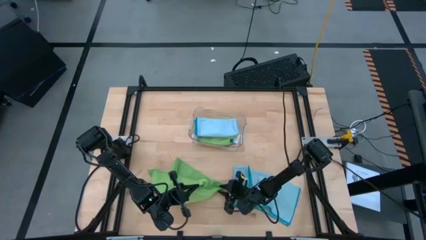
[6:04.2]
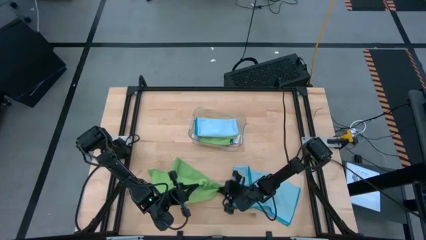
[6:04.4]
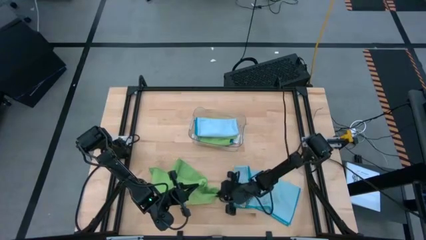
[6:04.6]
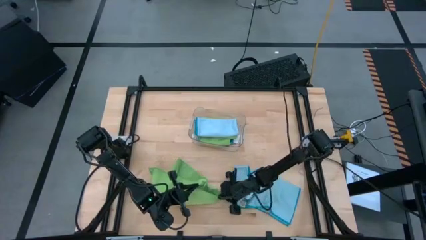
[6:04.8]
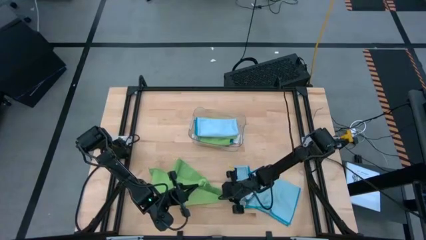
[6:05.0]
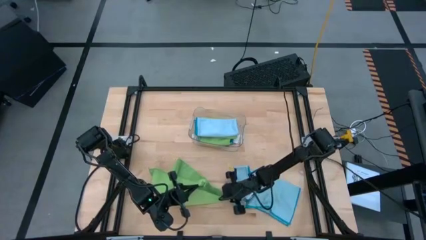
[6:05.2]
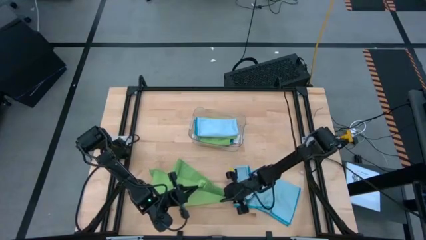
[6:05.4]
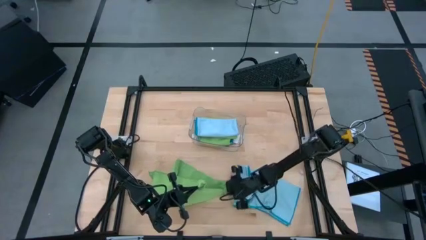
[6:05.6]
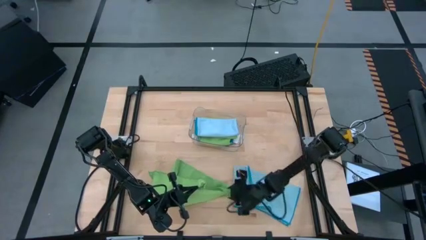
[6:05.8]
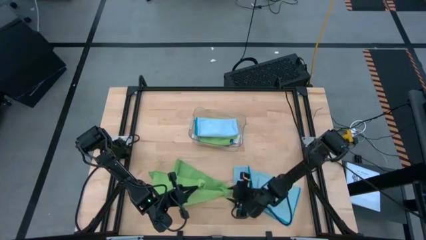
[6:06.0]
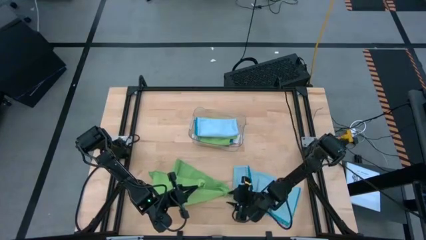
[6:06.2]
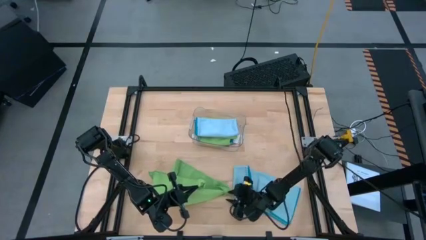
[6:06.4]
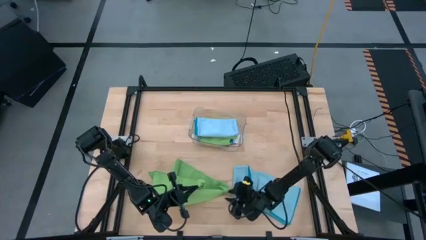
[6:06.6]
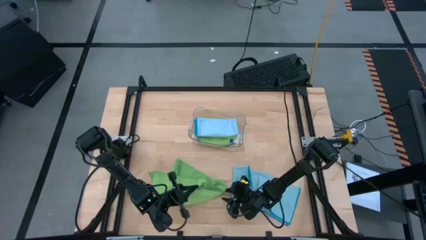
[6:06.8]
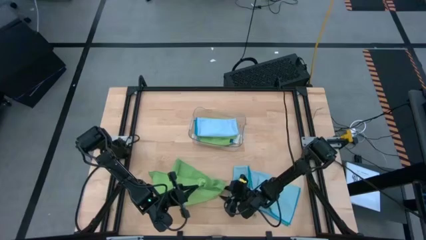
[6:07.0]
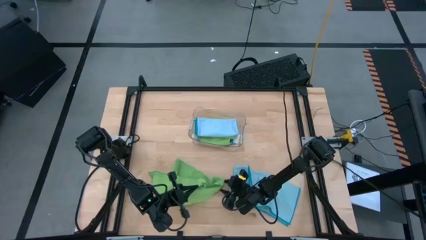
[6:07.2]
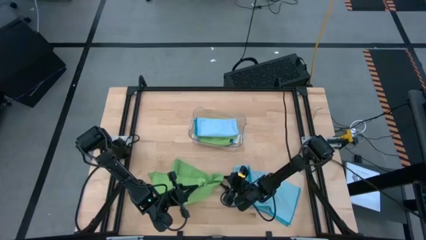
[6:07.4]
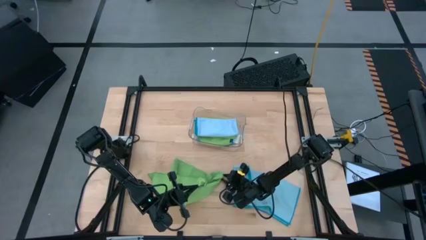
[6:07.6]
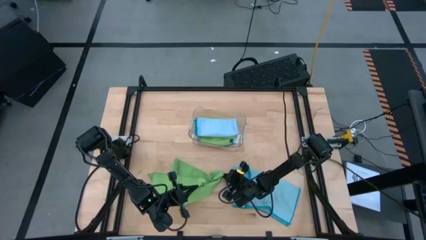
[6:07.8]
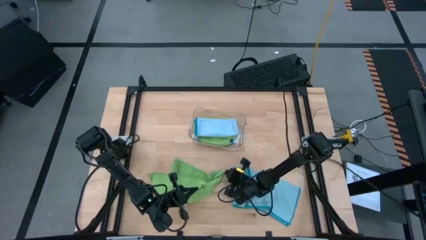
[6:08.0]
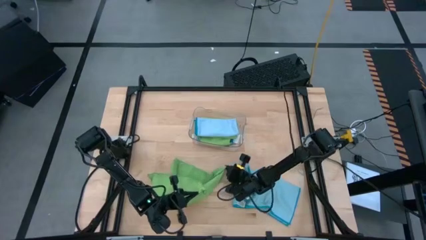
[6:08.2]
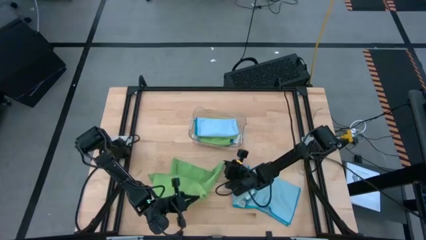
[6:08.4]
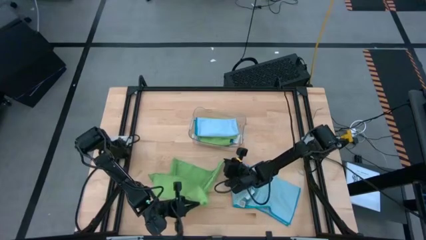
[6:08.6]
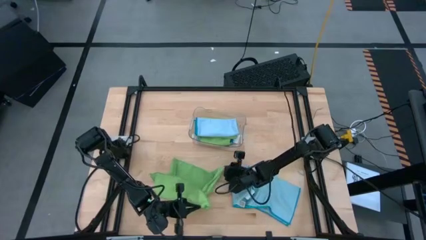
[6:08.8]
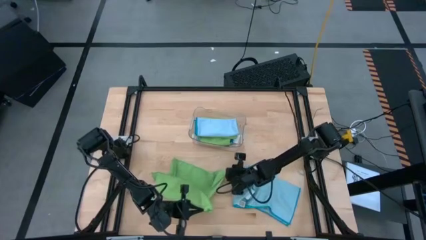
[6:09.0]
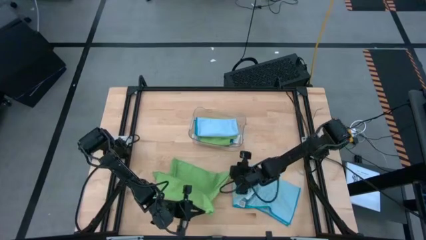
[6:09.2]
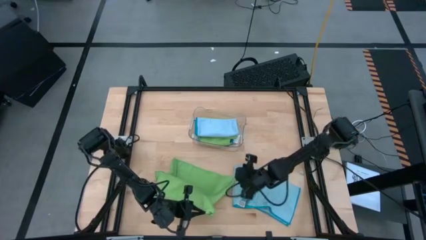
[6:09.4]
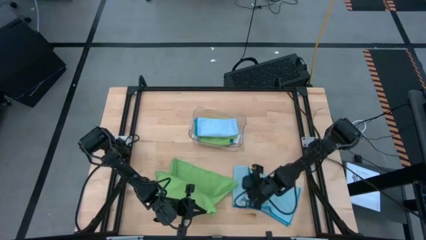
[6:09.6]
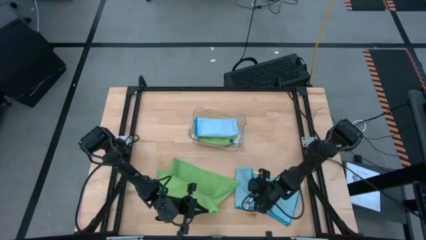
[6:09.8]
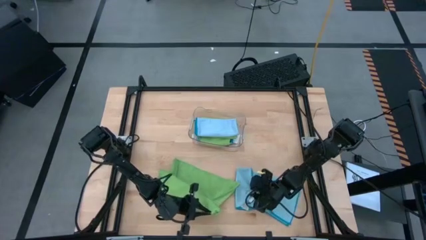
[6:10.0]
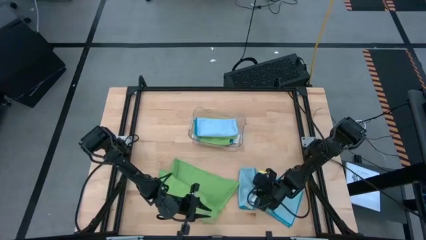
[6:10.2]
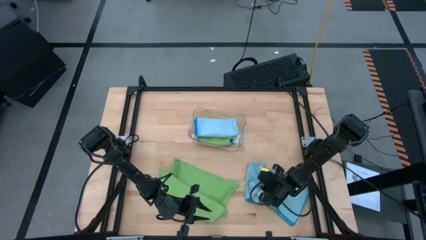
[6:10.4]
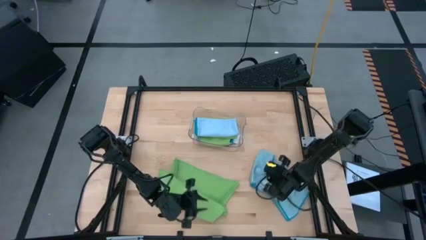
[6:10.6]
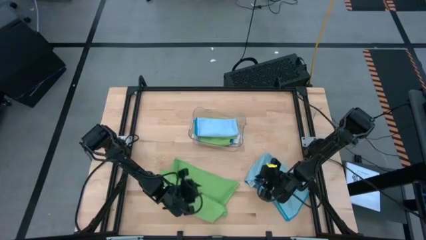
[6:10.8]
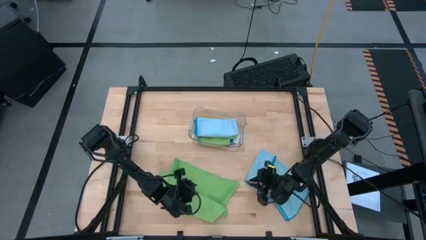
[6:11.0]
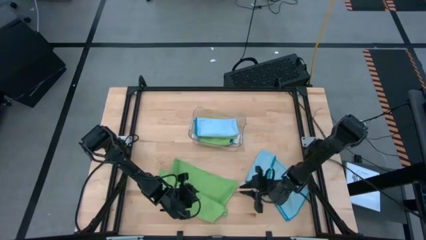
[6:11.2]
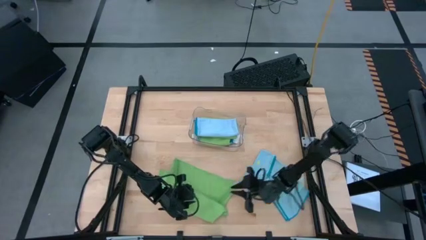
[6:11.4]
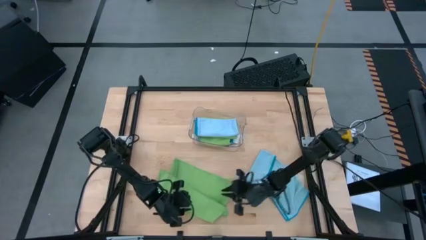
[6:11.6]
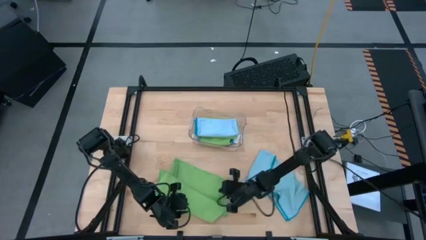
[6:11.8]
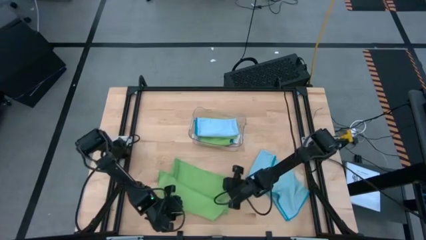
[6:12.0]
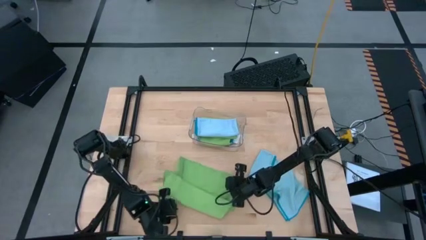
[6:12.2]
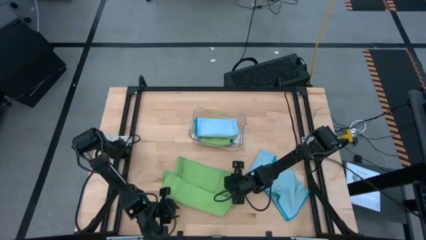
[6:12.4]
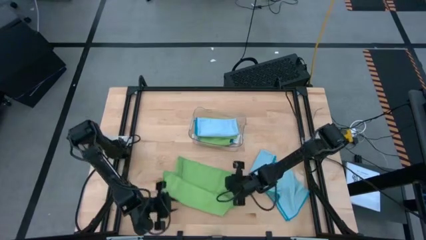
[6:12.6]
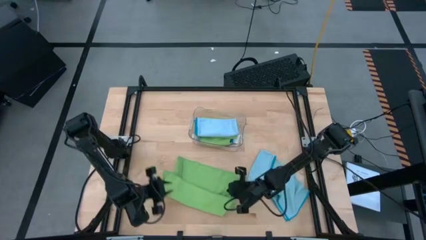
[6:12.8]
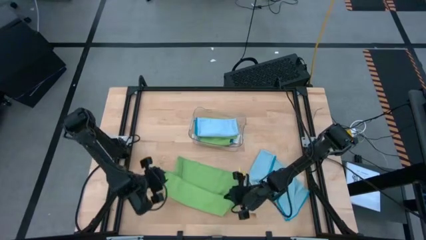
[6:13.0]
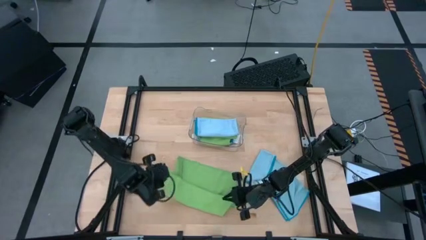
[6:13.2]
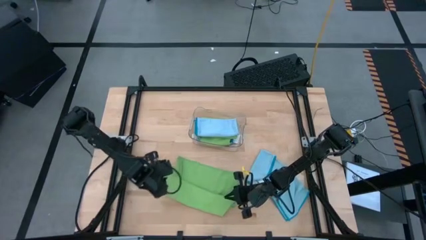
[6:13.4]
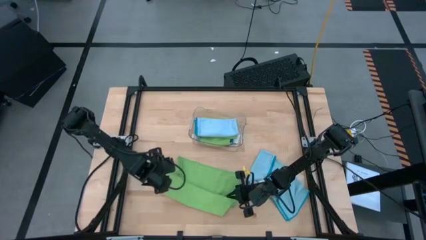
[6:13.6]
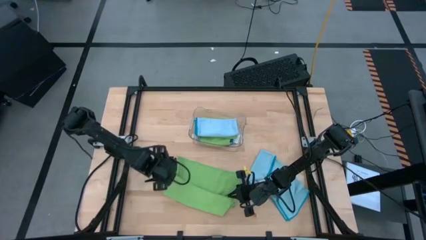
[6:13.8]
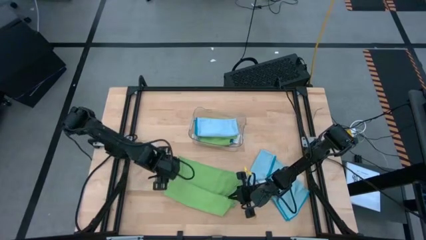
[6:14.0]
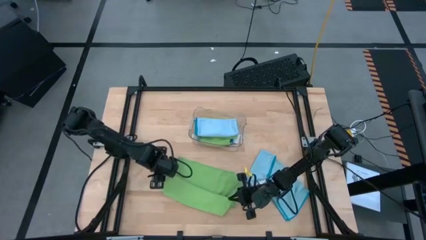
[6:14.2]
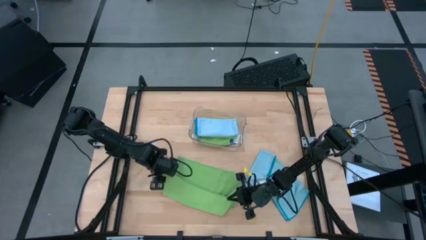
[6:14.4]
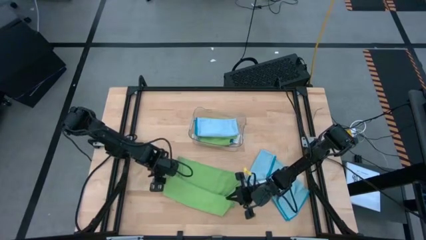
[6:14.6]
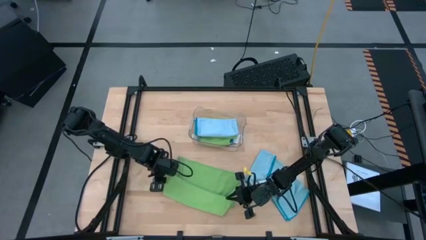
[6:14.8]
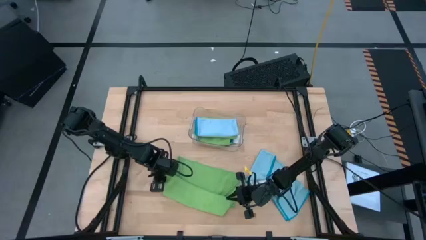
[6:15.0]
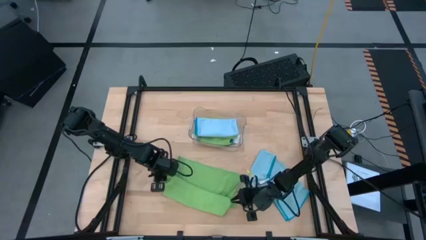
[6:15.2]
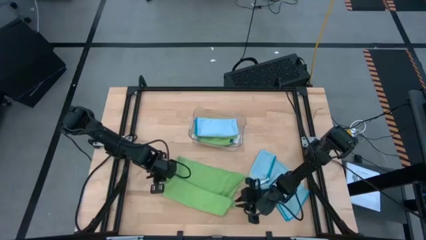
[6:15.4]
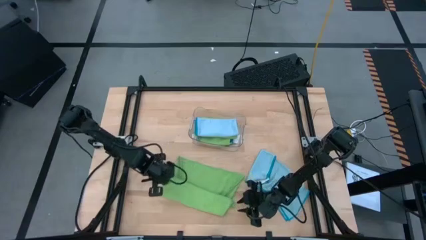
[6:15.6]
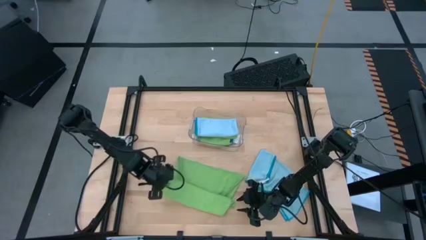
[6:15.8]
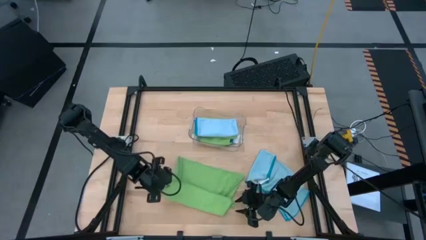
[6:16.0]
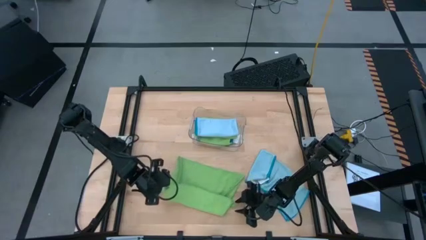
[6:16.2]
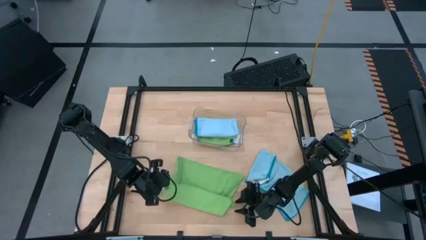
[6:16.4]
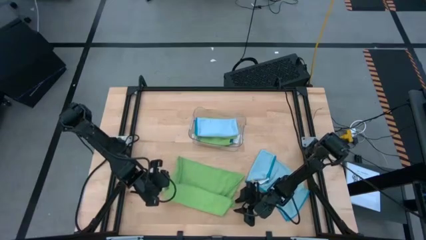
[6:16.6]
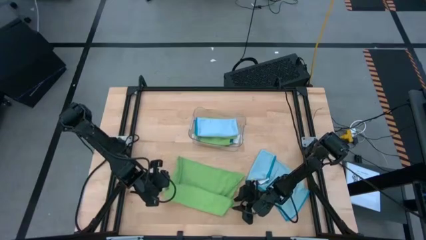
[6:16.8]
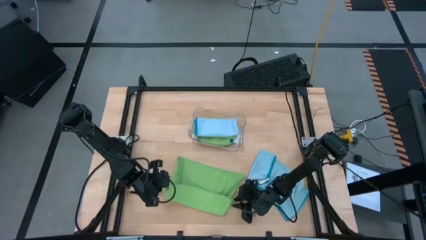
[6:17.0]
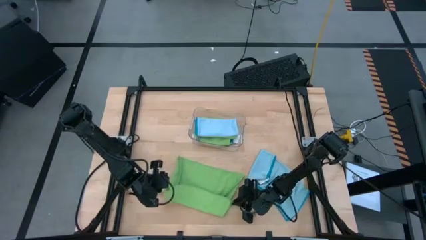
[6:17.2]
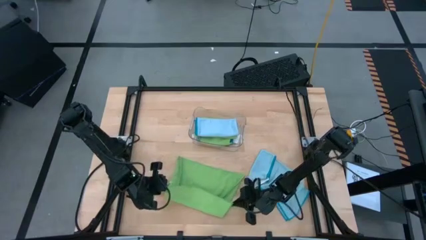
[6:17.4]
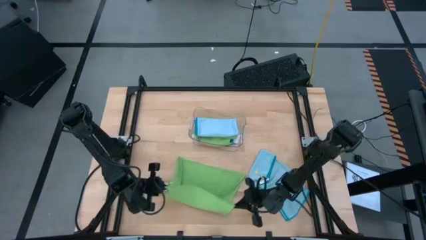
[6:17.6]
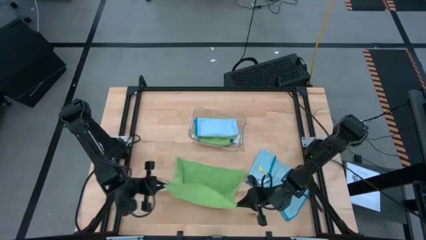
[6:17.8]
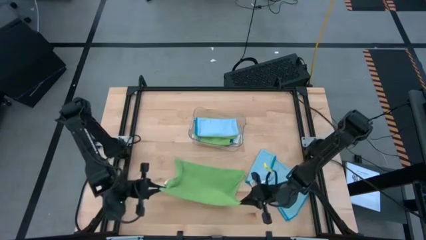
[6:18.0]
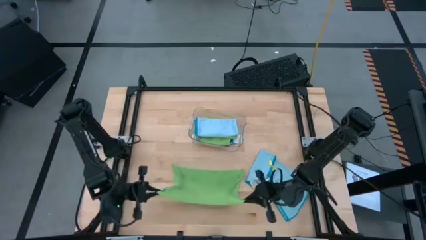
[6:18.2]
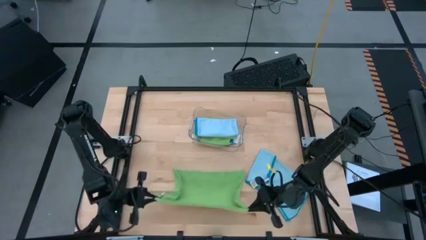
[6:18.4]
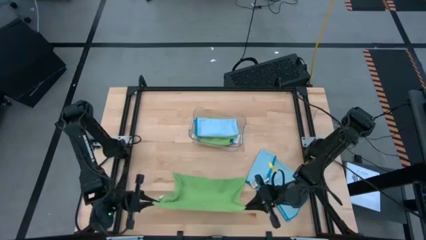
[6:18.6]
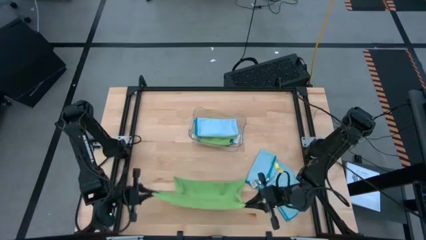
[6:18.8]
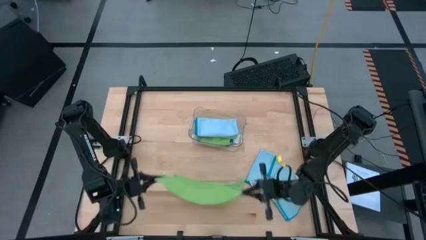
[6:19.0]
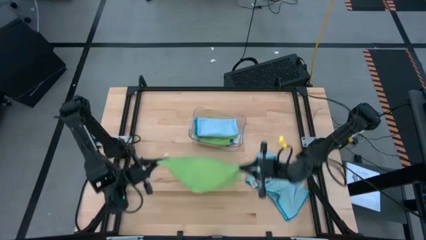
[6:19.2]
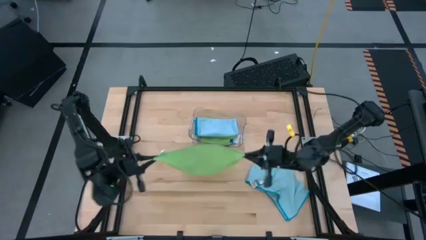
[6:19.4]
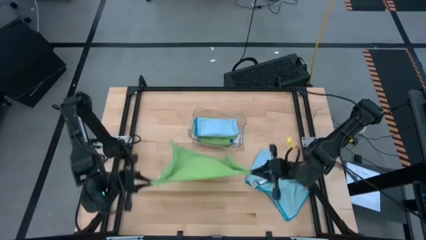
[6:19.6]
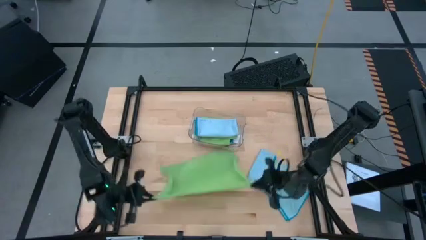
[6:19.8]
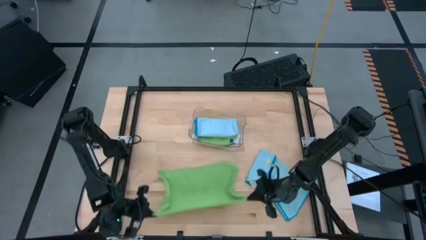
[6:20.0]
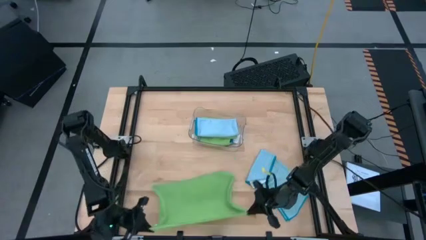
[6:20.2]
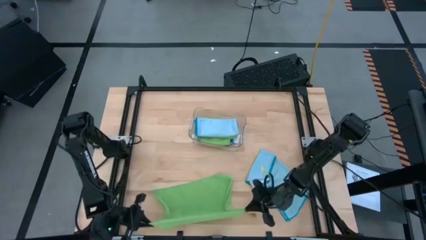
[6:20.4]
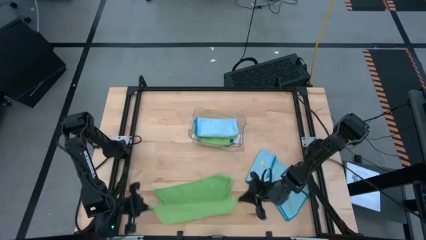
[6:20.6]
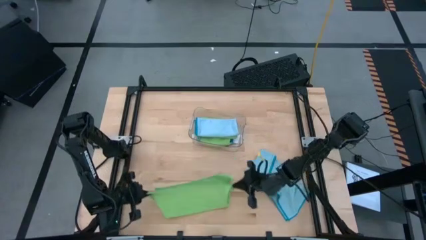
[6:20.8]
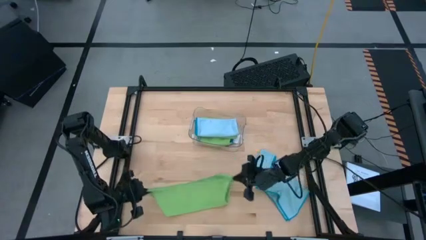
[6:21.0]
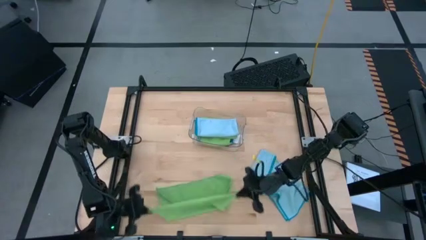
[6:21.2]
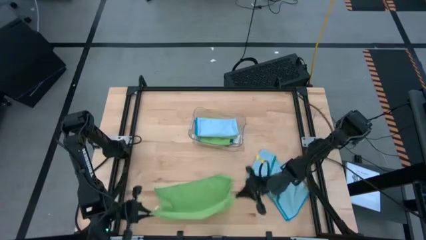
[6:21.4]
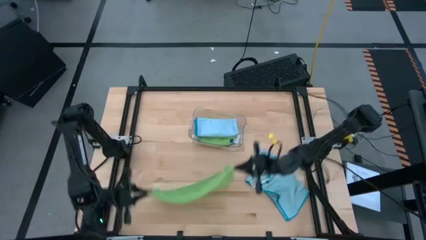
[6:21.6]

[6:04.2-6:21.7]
Task: Fold microfiber towels
Fold the green microfiber cloth

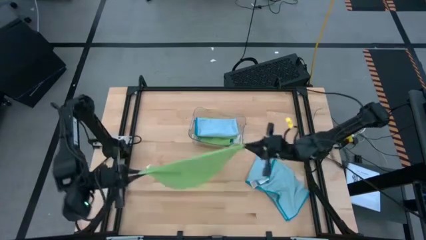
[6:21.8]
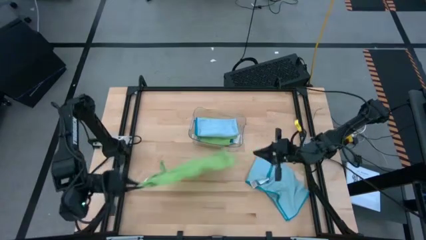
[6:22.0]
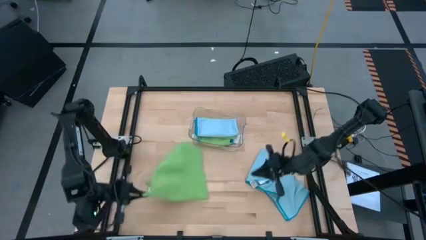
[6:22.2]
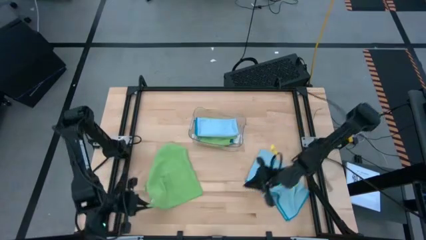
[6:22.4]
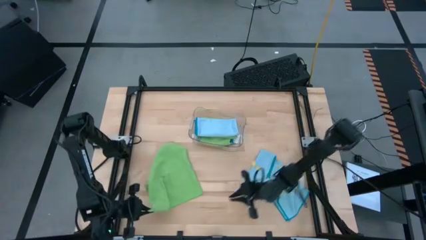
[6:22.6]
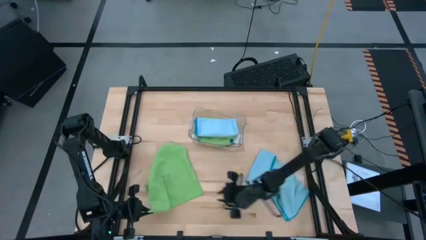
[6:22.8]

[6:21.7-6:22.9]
Fold the green microfiber cloth
